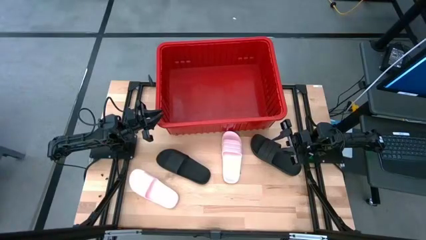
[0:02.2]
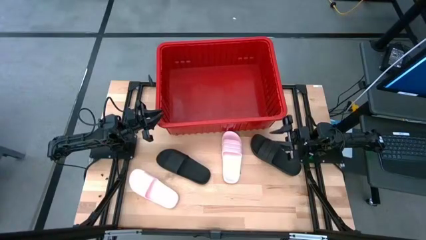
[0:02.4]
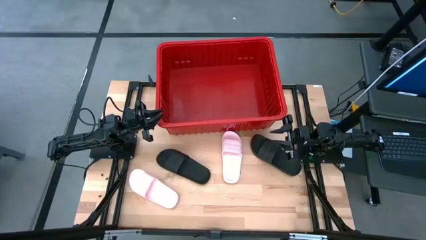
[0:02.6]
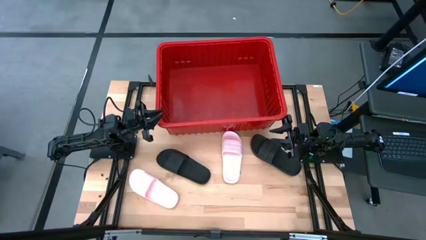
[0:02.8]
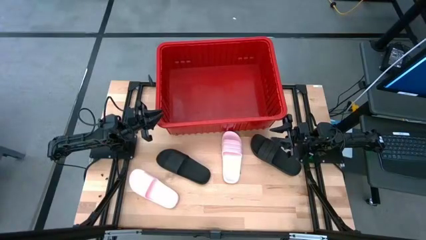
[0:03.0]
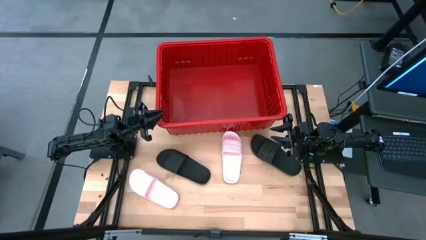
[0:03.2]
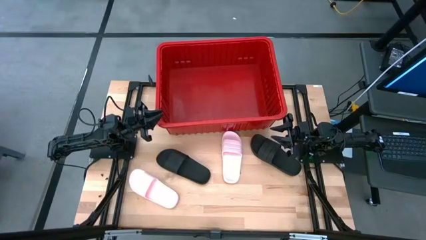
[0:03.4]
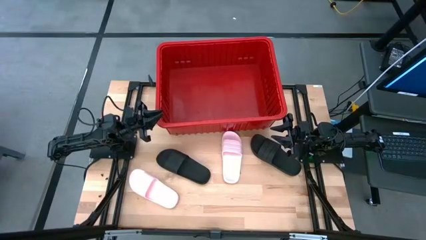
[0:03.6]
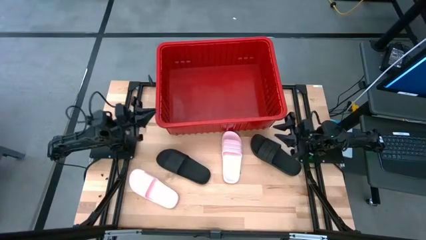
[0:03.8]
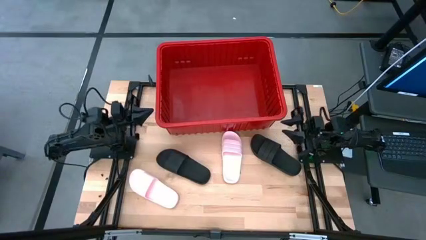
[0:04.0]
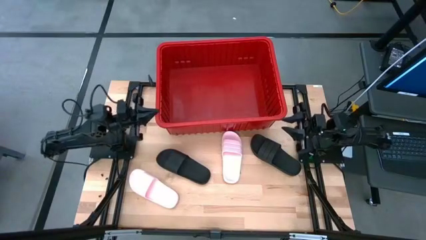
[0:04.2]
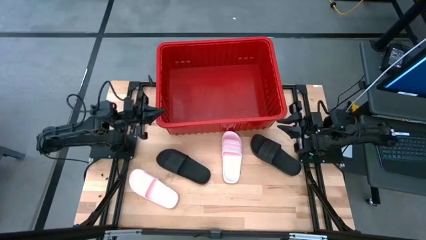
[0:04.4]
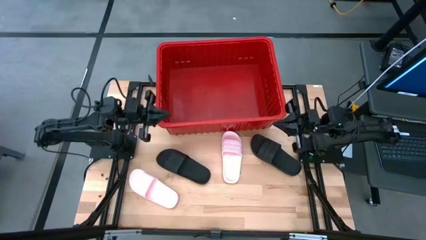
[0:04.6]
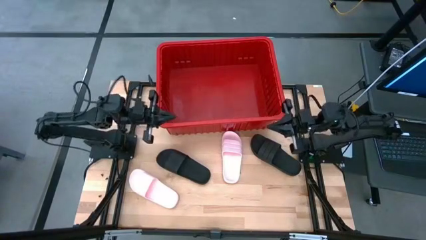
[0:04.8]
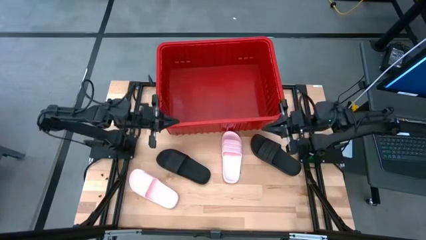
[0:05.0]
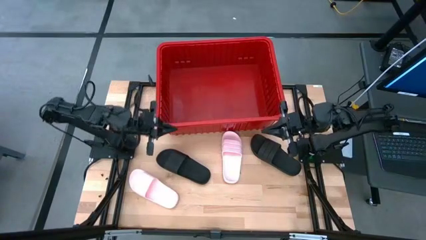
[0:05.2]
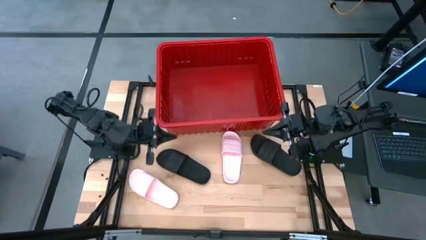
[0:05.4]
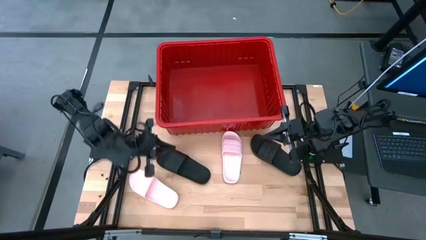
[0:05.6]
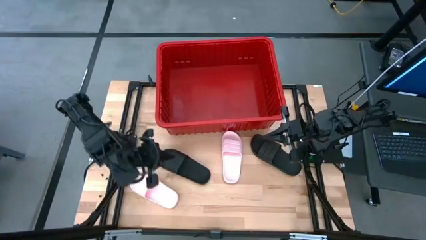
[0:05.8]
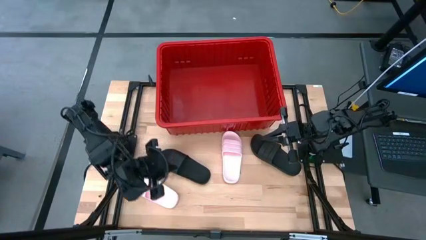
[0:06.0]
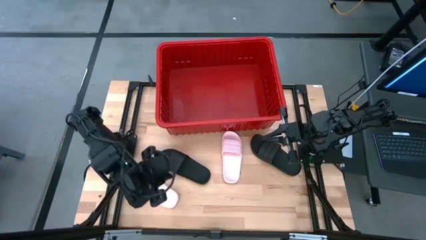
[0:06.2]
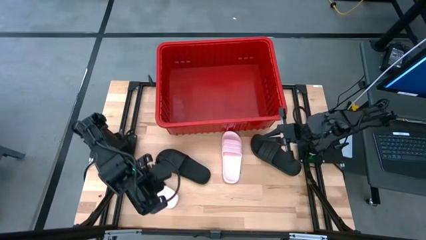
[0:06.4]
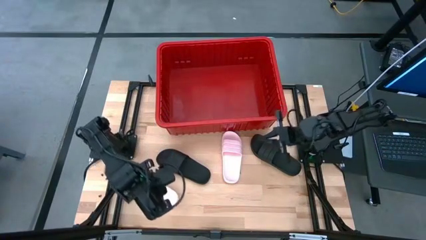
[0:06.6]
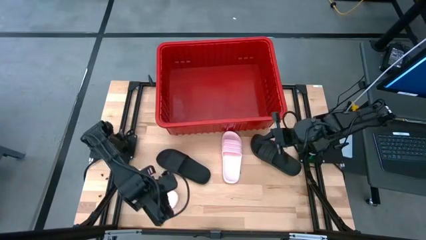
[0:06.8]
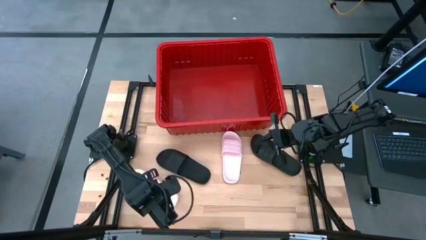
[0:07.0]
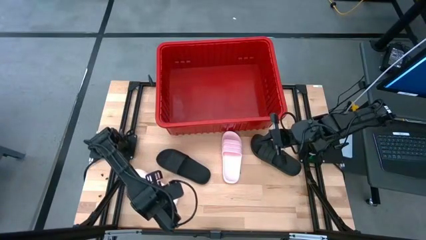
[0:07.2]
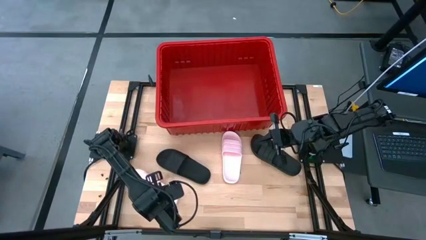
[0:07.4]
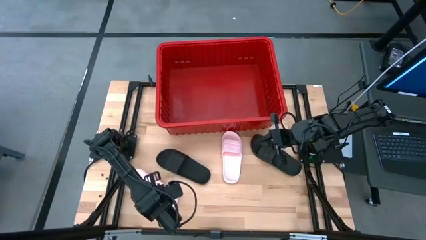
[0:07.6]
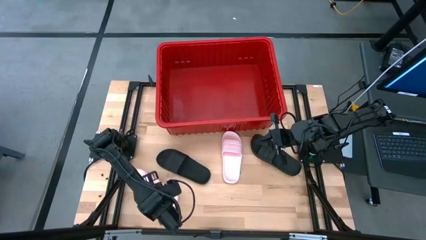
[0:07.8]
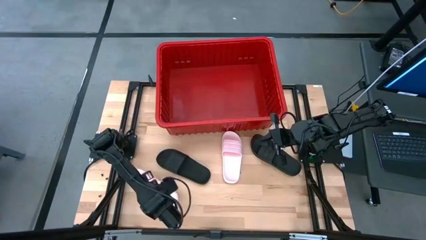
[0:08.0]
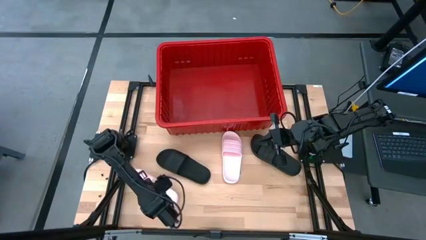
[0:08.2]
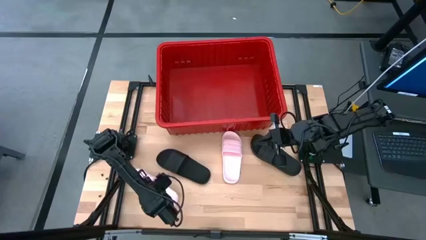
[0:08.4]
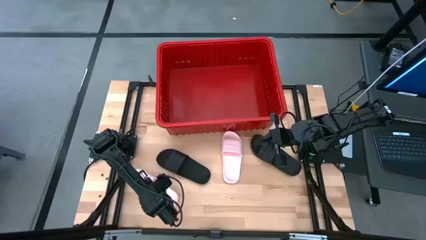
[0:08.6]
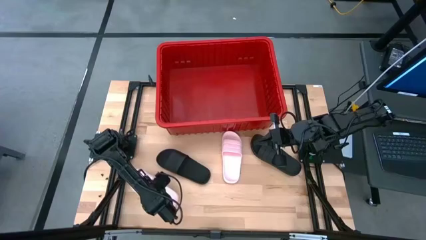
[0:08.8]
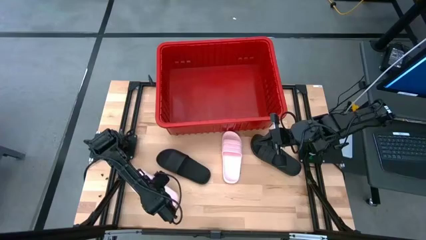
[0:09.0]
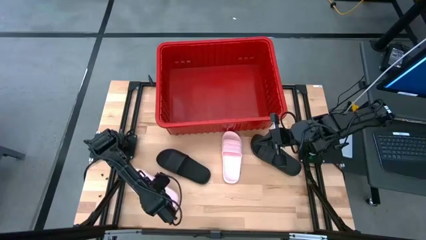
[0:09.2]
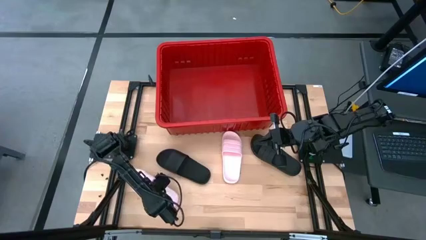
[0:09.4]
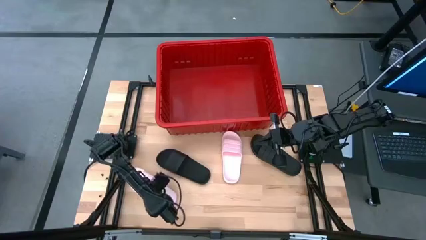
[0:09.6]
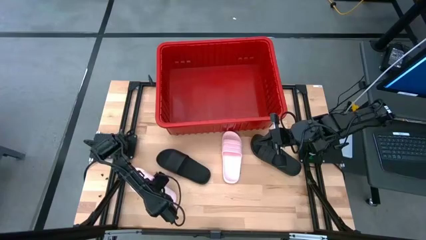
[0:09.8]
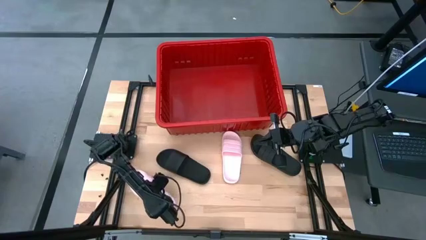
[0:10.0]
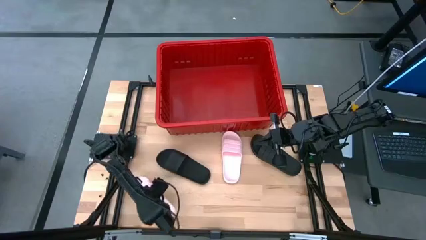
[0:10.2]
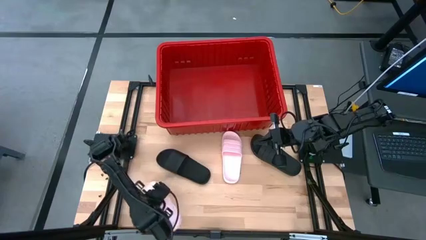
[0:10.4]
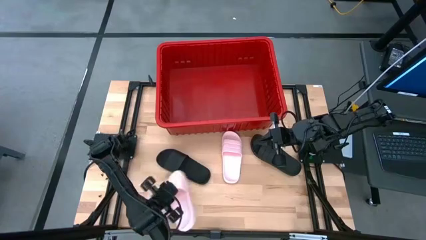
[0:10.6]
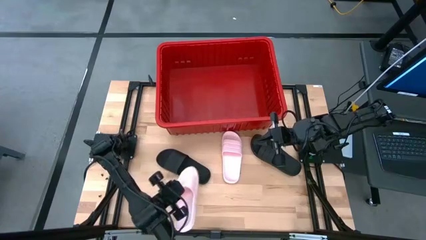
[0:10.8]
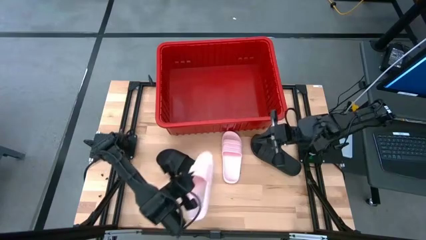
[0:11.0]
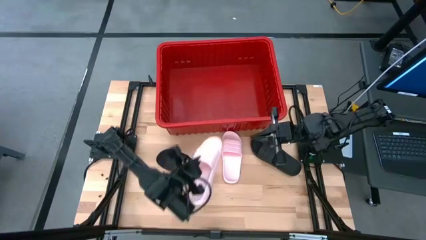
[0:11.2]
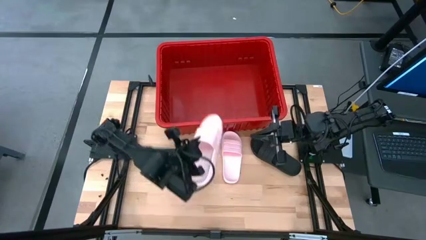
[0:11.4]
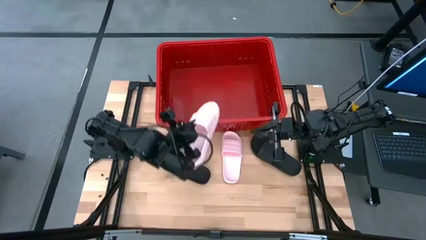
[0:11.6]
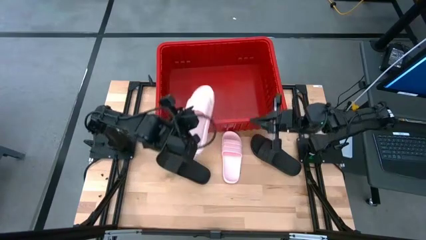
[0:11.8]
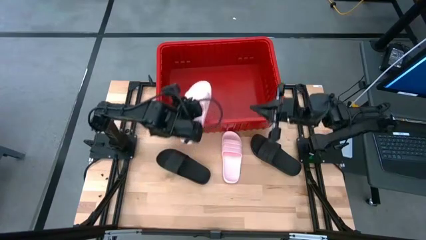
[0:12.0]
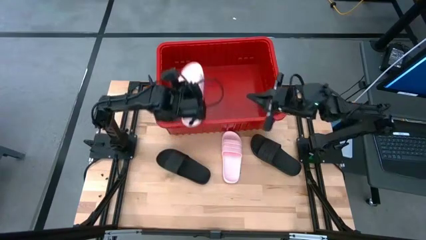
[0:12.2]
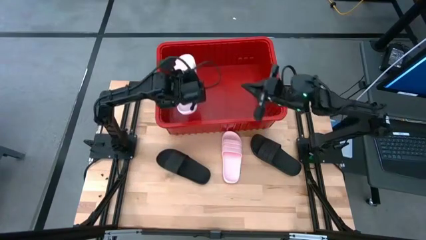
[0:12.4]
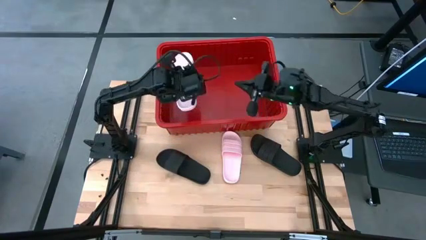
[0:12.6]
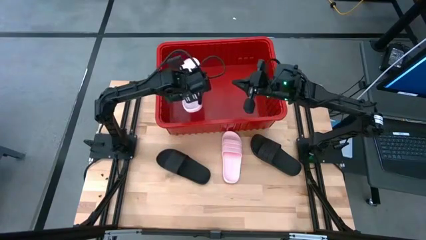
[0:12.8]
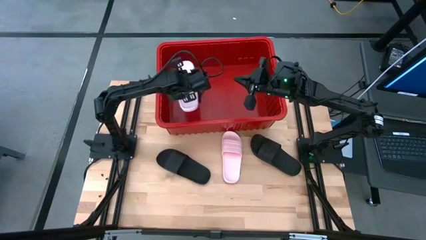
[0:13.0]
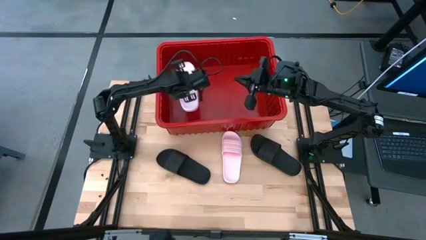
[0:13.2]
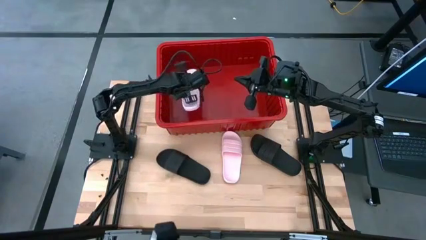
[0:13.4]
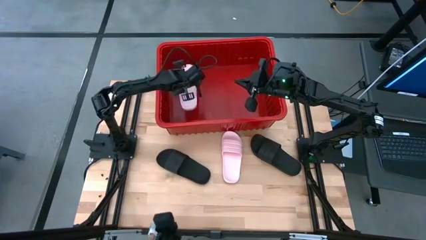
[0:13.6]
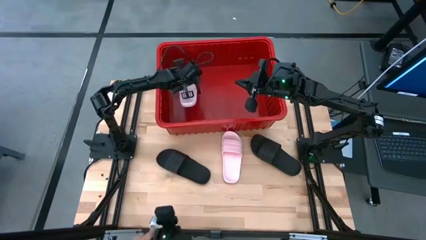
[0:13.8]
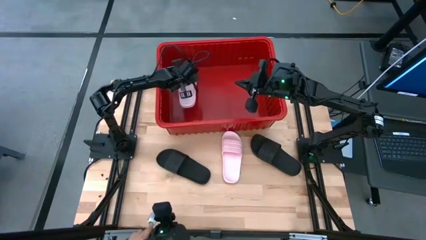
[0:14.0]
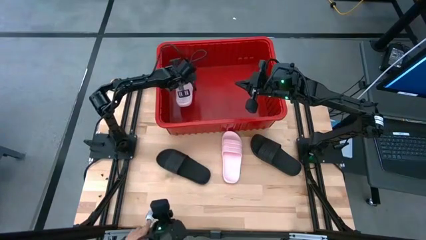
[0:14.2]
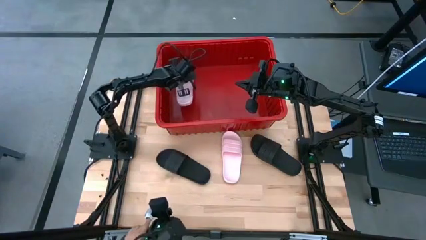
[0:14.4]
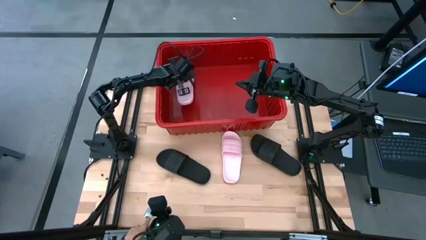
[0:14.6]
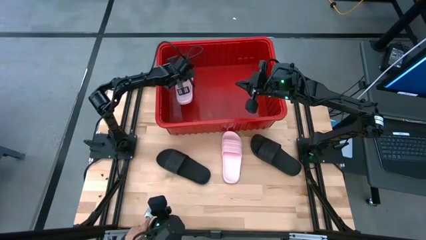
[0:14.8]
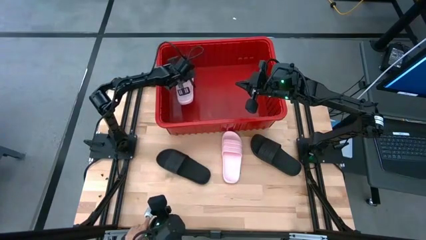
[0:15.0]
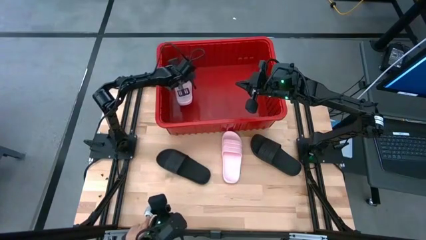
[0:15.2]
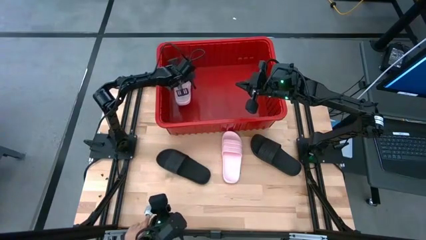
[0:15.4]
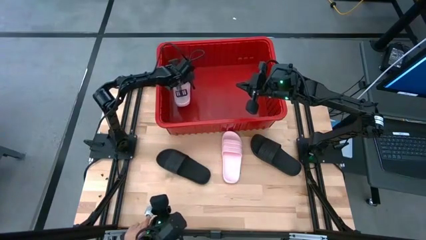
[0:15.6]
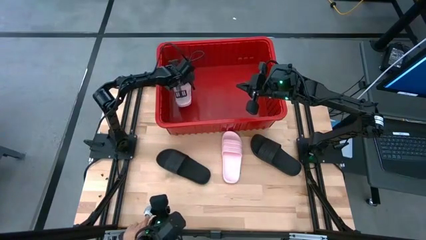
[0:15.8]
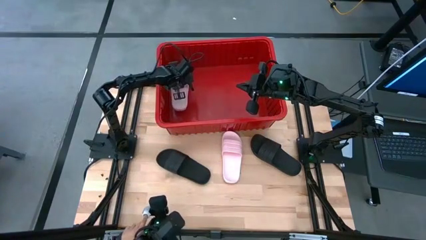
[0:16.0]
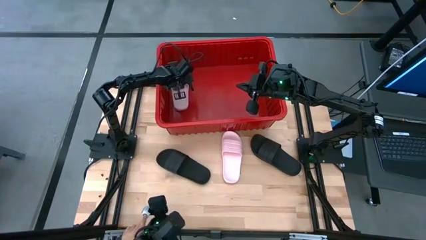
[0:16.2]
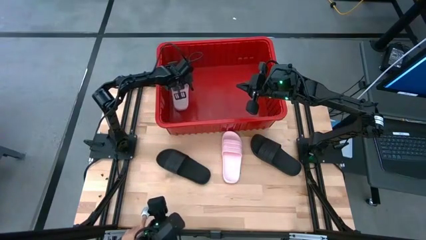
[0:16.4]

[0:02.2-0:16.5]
Task: Pick and place slides into bin
Put the bottom pink slide into the red bin

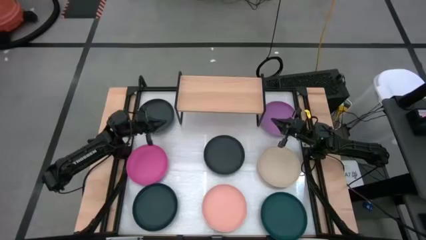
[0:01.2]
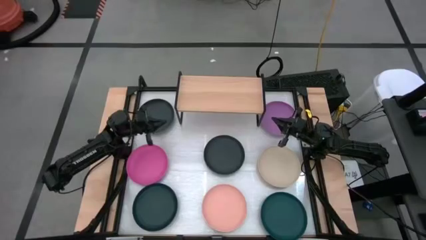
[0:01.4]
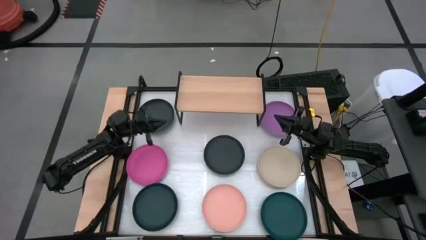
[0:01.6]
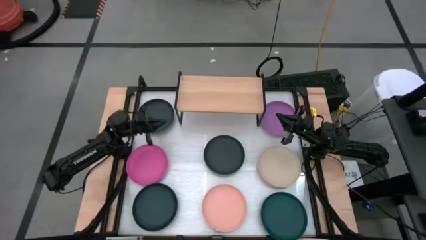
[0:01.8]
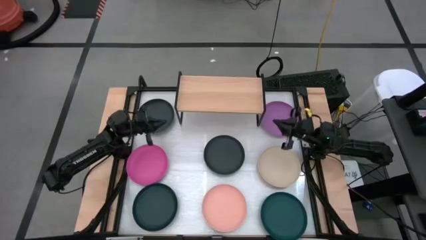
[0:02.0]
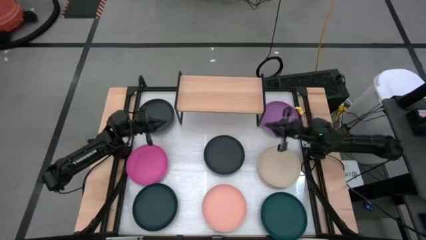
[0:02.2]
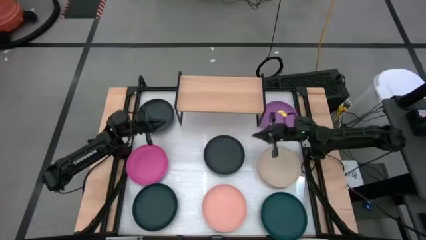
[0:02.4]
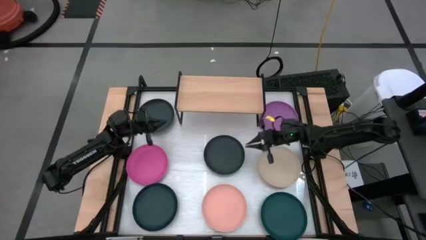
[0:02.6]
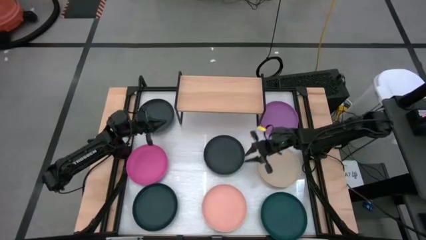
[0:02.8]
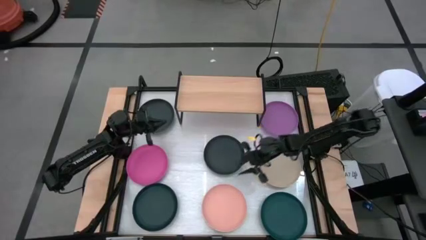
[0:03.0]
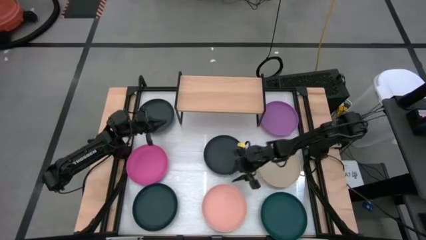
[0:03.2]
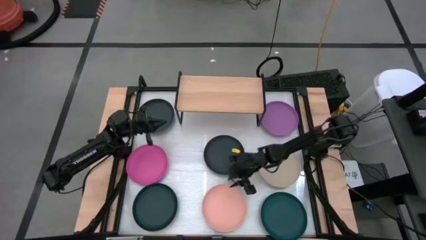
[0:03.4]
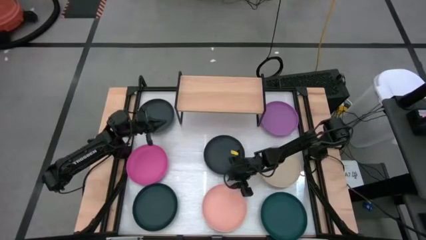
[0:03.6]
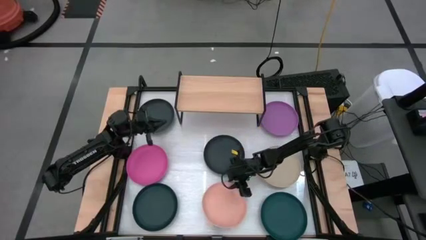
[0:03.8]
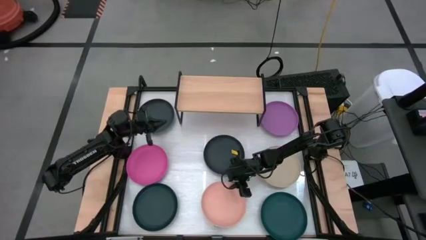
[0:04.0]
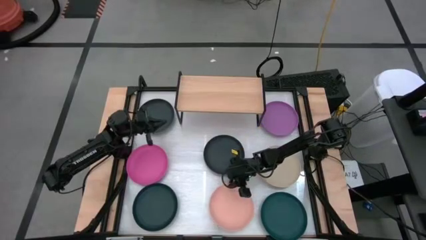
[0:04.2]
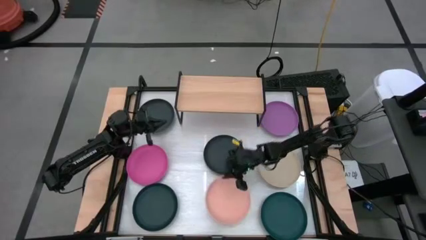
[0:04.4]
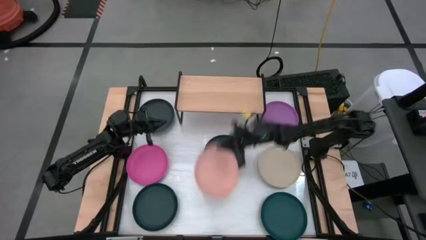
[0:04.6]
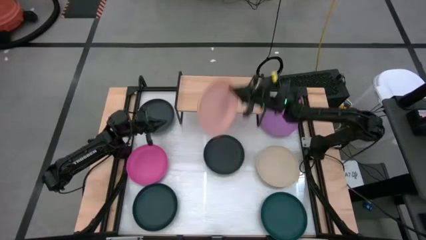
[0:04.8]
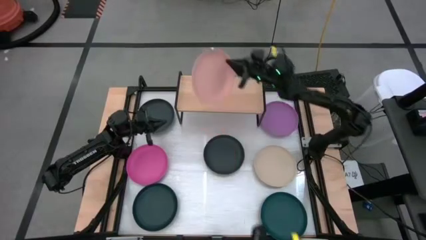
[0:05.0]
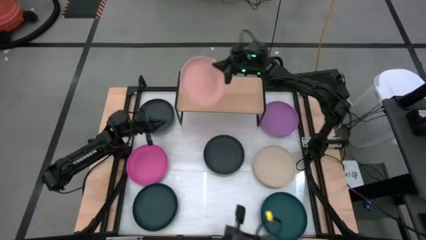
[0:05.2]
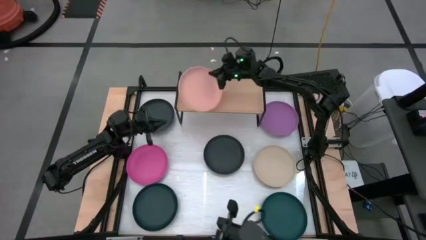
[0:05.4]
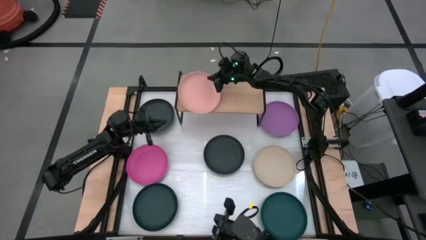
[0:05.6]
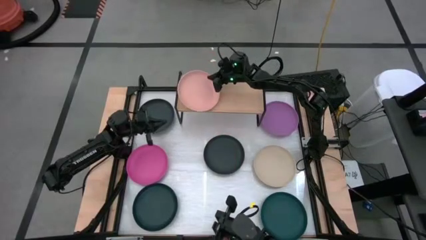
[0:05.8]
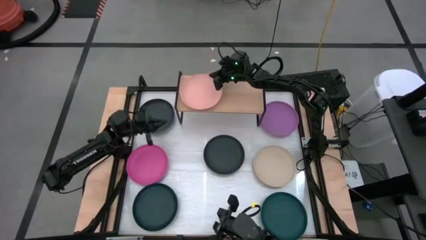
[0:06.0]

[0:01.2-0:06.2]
Task: Place and stack plates onto a shelf
Put the orange plate on the shelf
